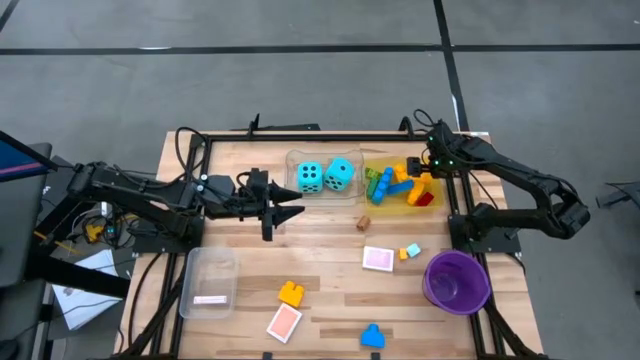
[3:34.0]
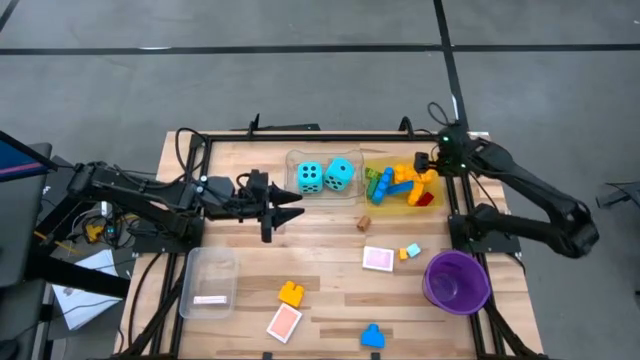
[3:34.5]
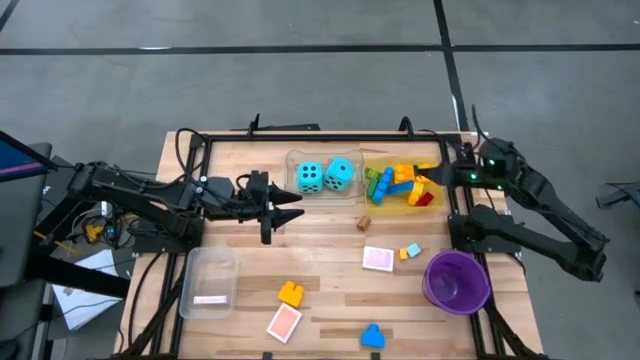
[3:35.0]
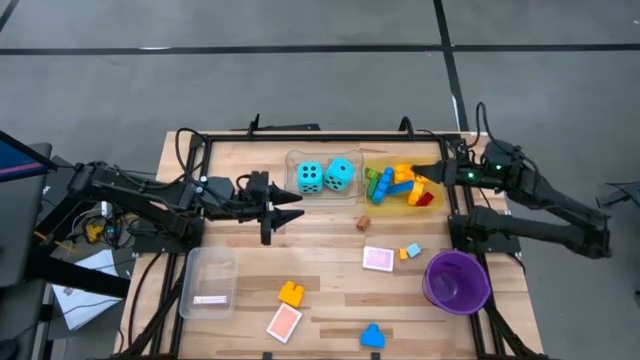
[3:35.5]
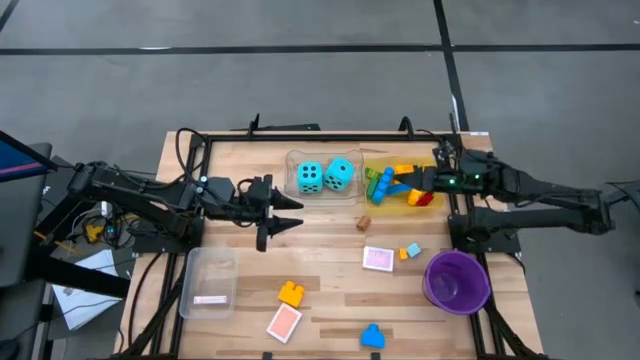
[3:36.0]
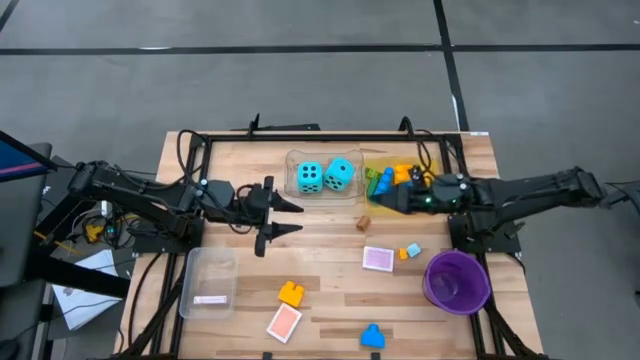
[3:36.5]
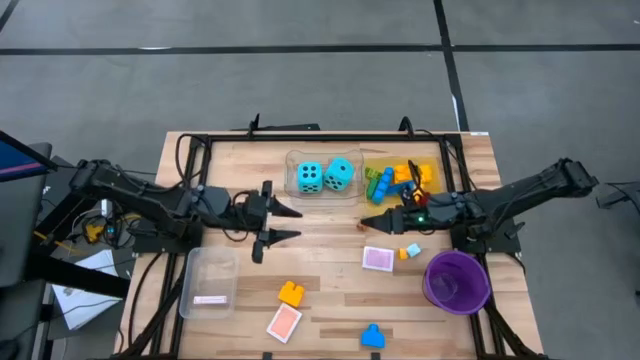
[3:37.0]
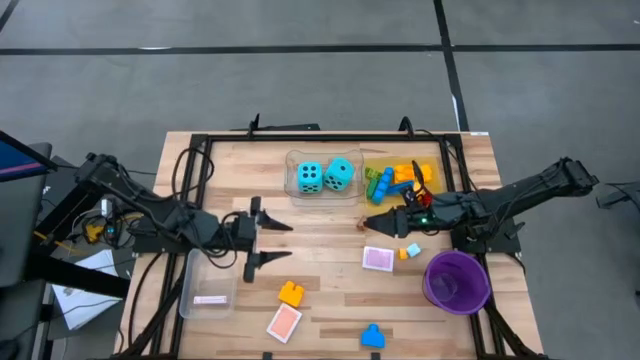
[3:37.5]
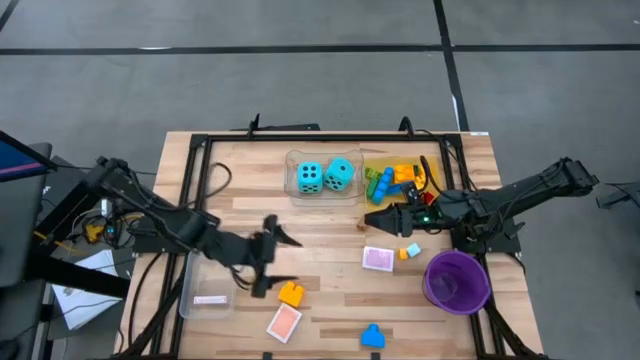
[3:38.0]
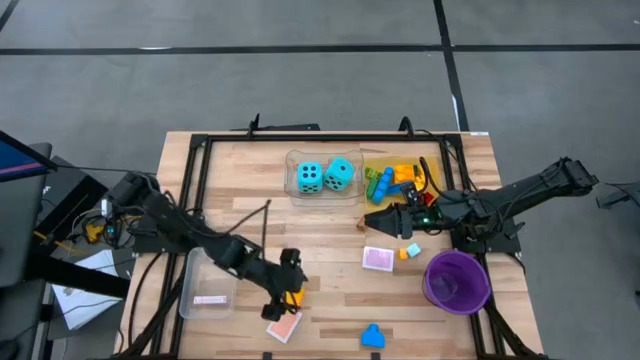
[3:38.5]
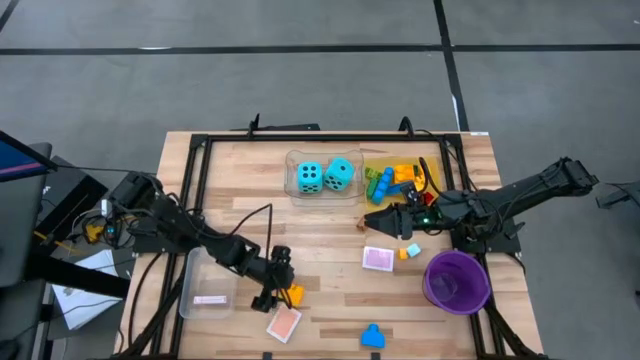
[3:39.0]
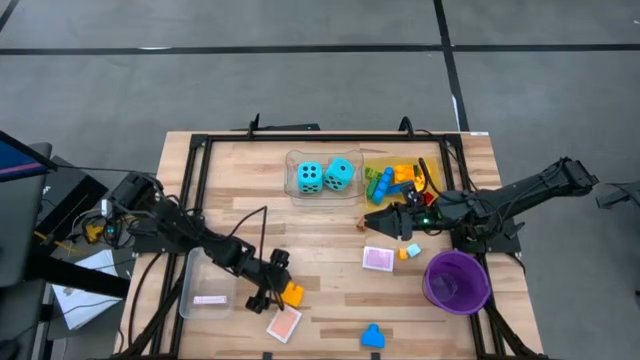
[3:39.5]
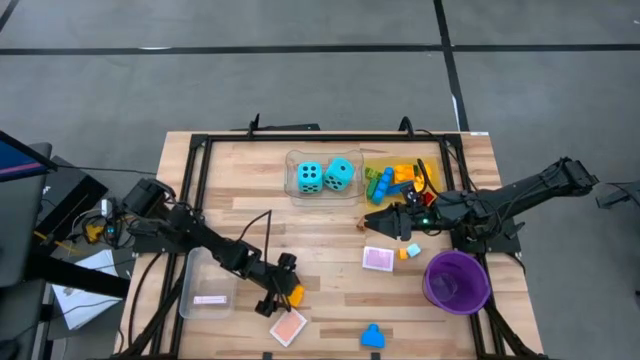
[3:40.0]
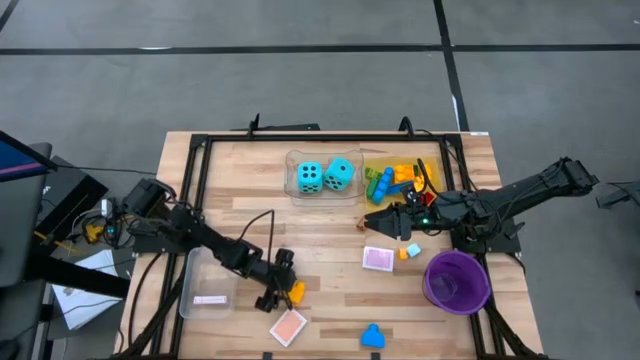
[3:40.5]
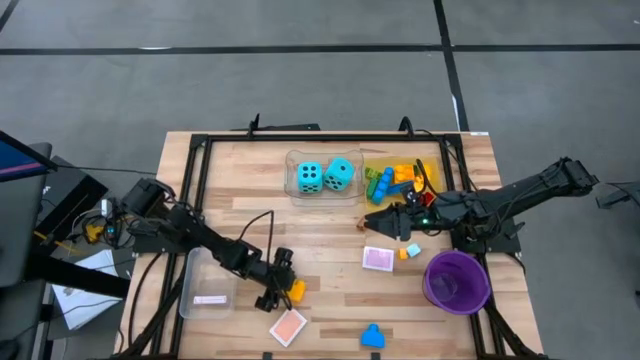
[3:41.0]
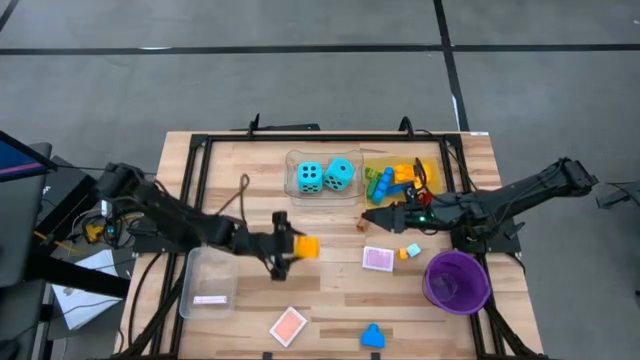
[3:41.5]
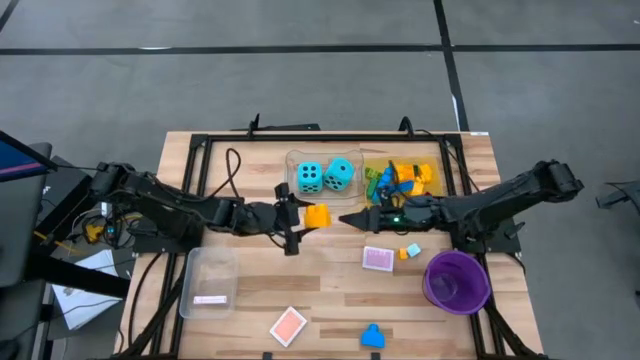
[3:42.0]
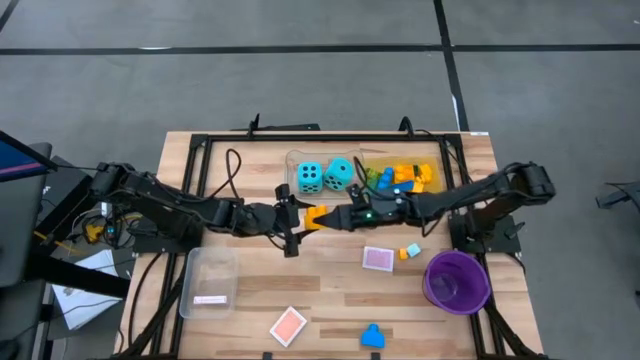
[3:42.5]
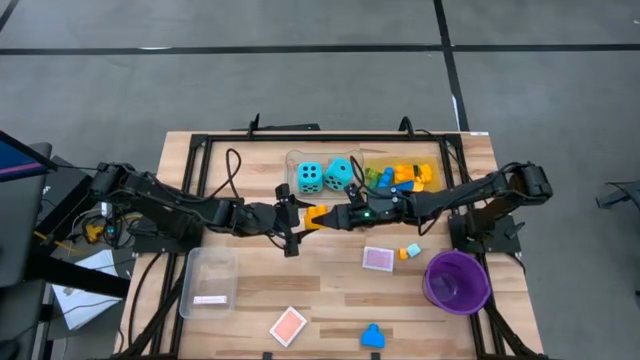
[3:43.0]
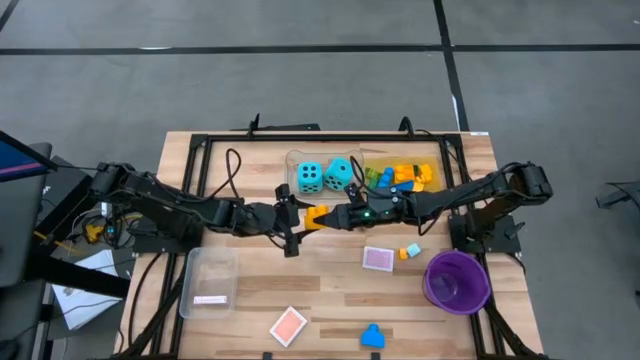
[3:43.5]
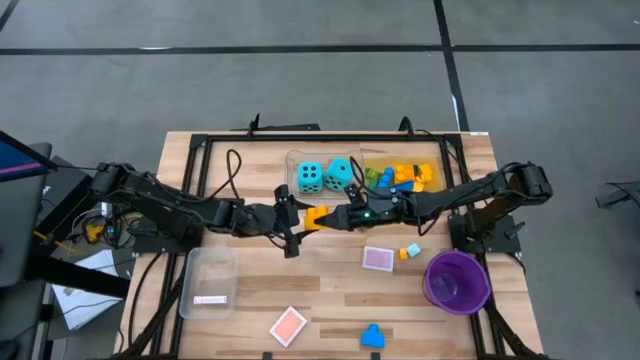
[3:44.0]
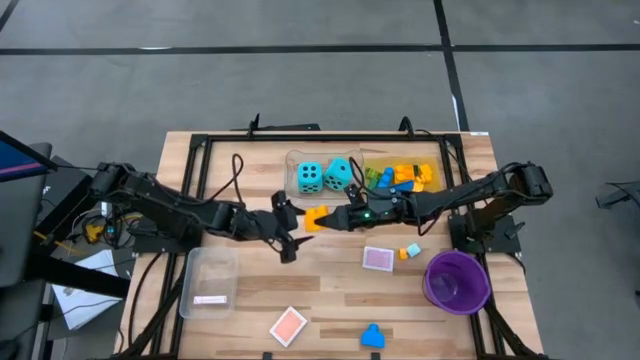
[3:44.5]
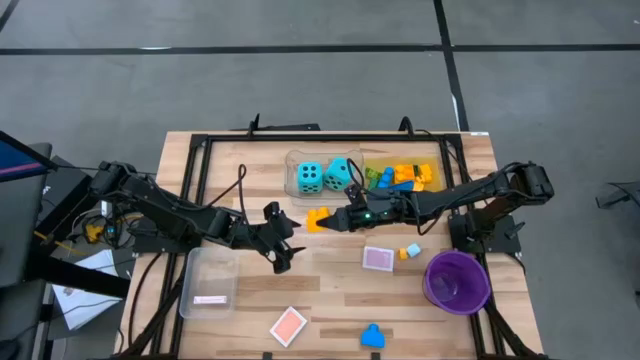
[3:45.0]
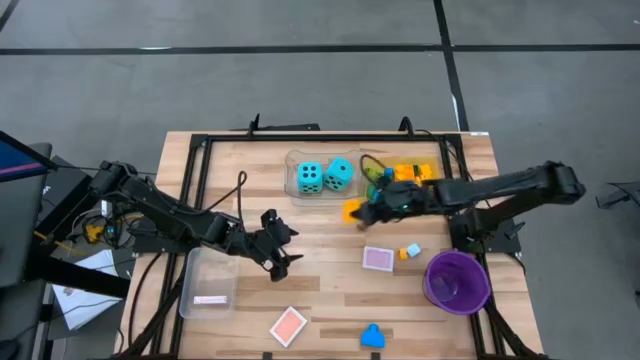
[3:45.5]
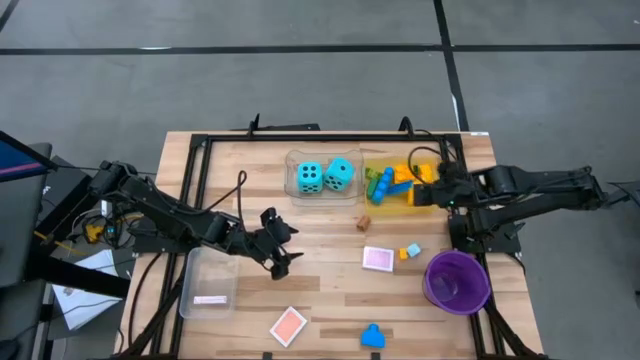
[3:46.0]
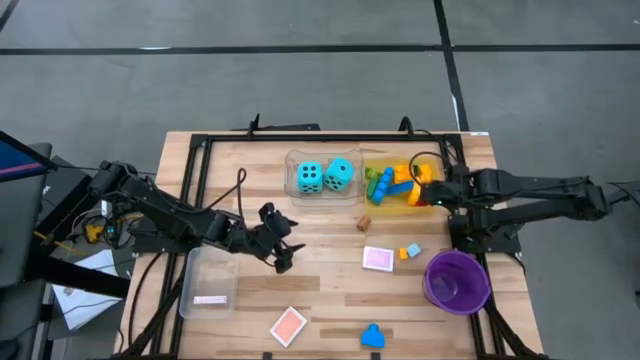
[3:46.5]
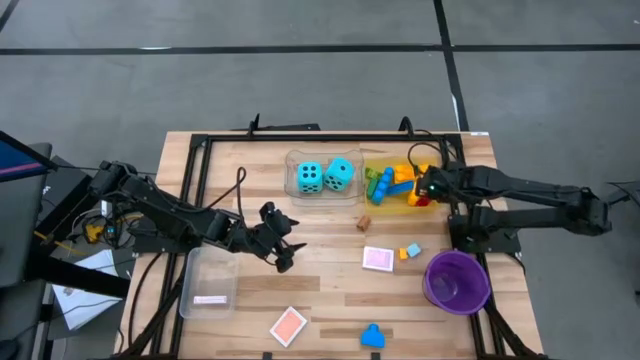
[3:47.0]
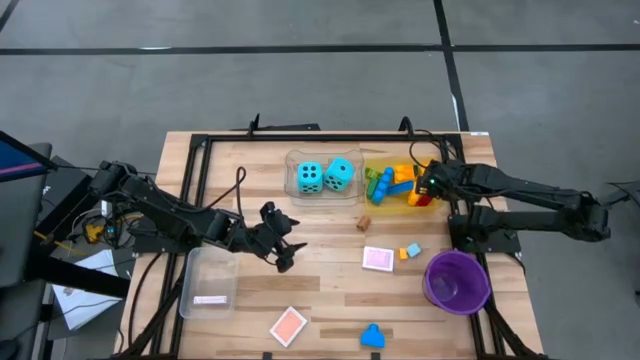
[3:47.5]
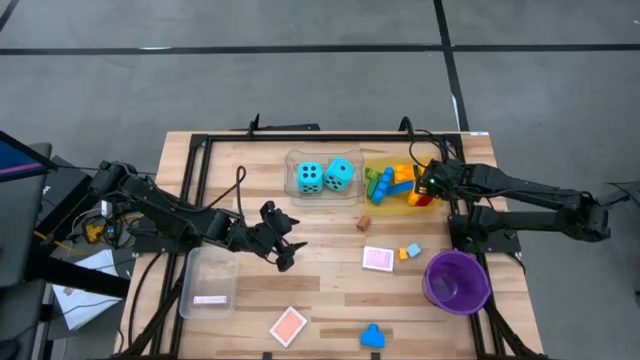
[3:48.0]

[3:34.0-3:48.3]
Task: Pick & Place Toys
Put the yellow game piece into the yellow bin

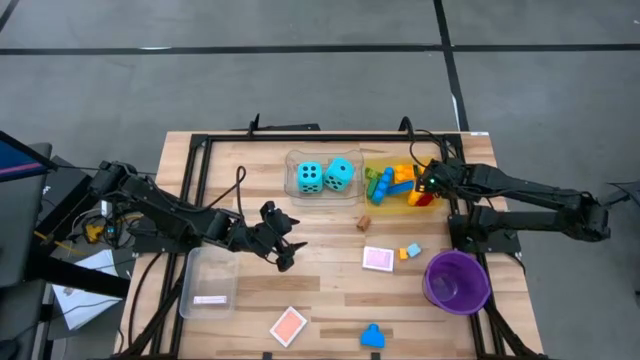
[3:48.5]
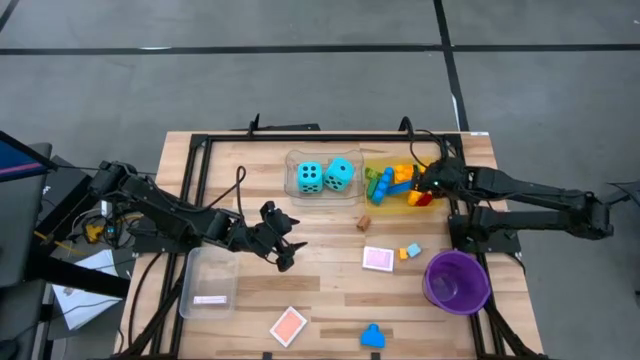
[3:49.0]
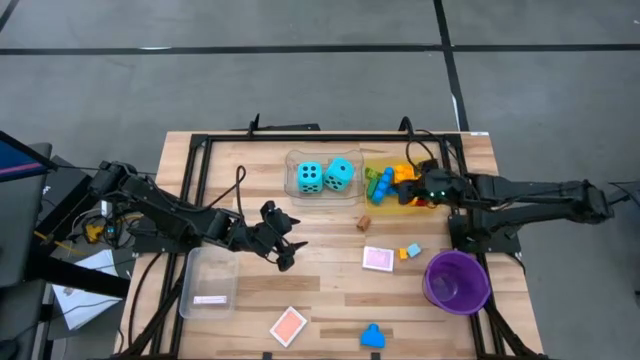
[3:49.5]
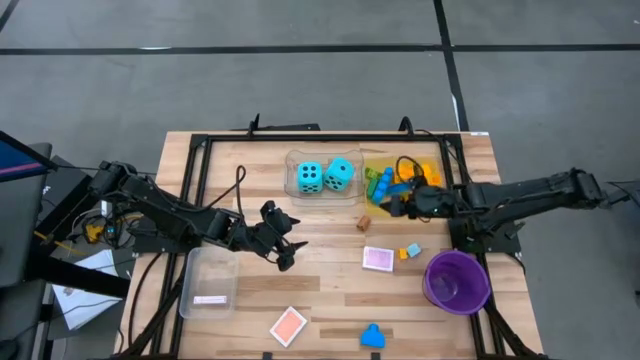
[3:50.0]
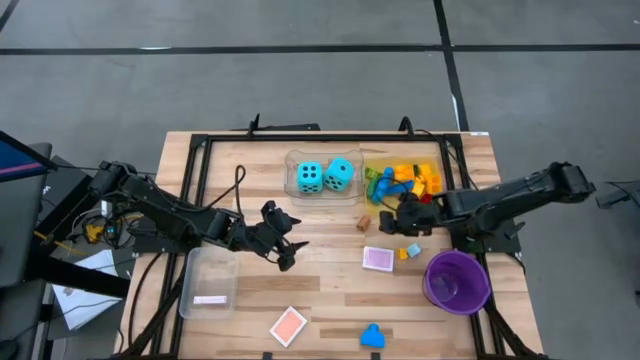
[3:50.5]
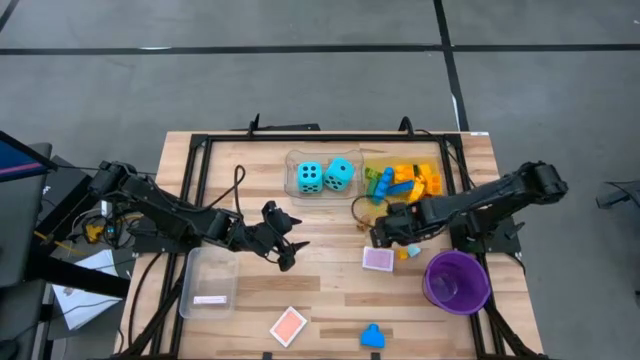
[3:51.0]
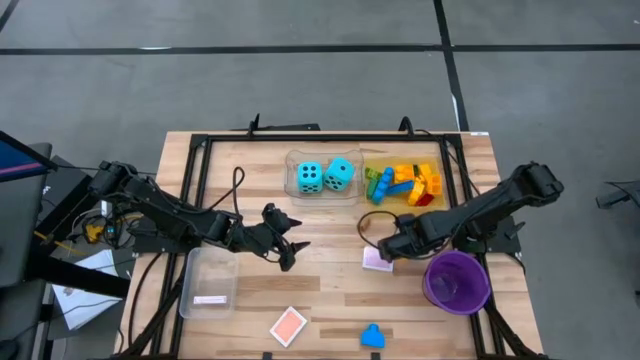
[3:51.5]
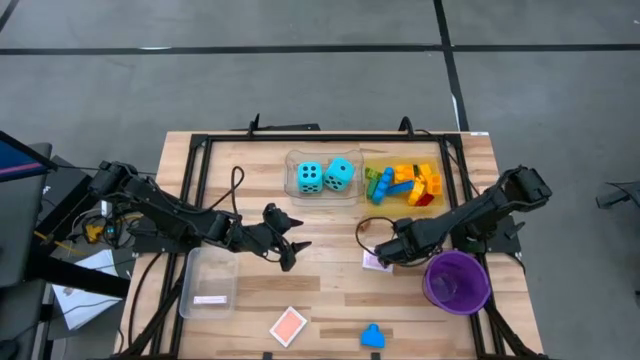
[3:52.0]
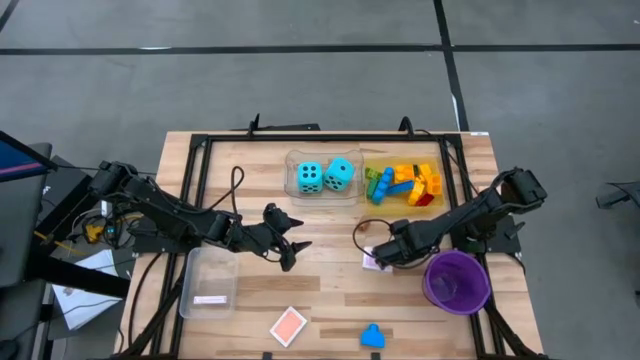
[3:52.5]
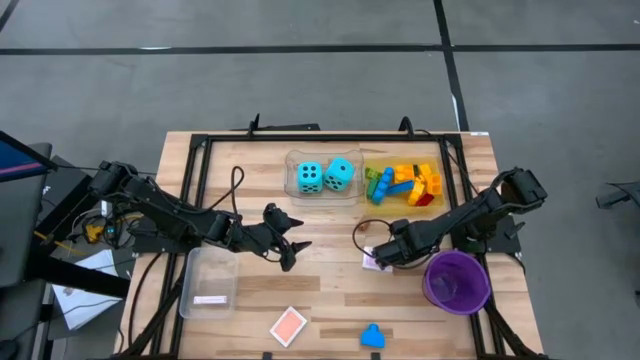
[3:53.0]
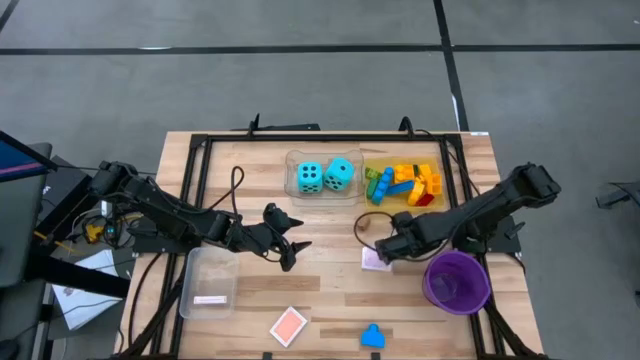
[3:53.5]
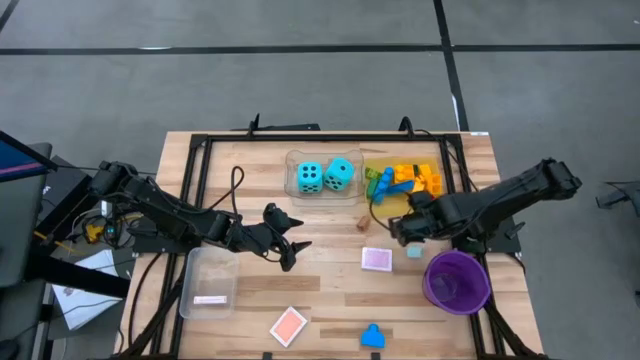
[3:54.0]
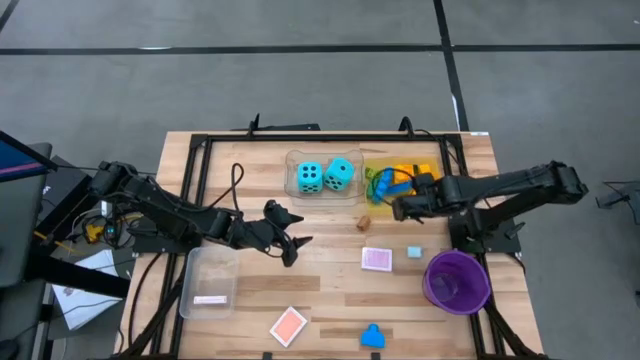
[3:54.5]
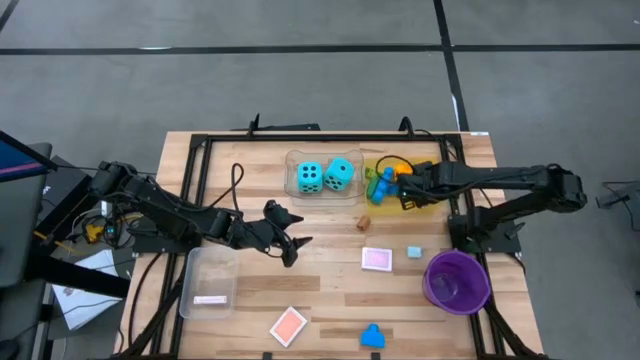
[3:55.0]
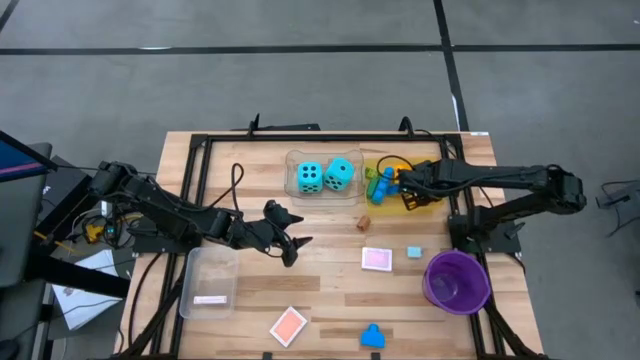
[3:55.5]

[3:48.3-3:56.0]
Put the yellow game piece into the yellow bin
